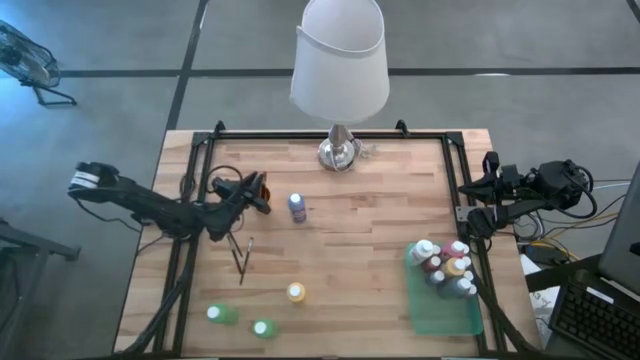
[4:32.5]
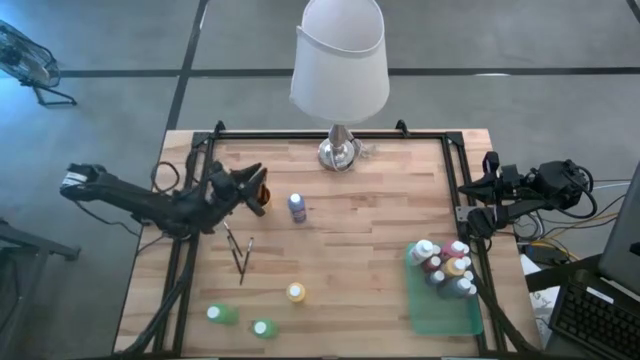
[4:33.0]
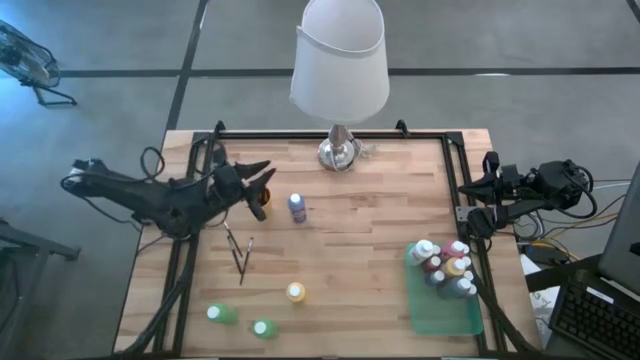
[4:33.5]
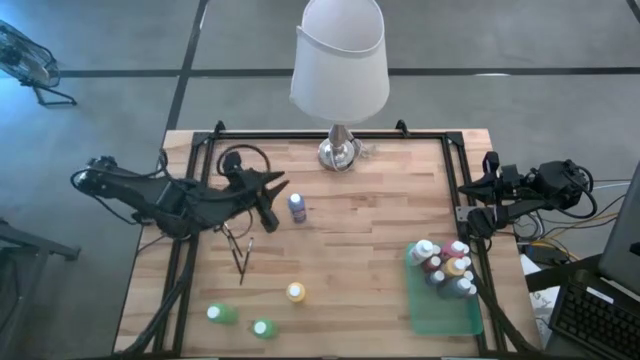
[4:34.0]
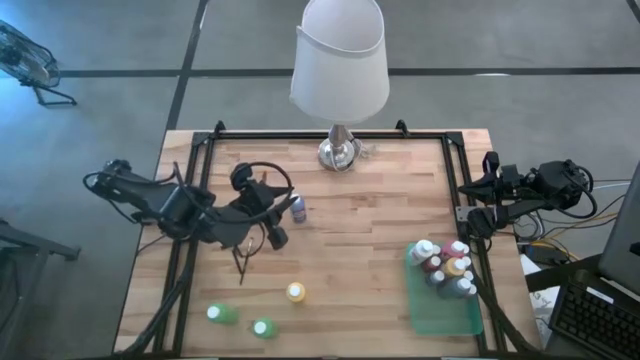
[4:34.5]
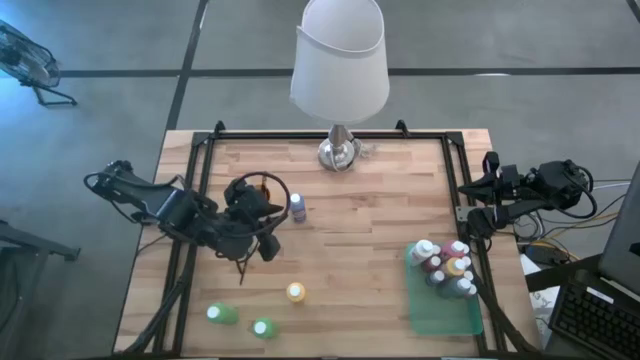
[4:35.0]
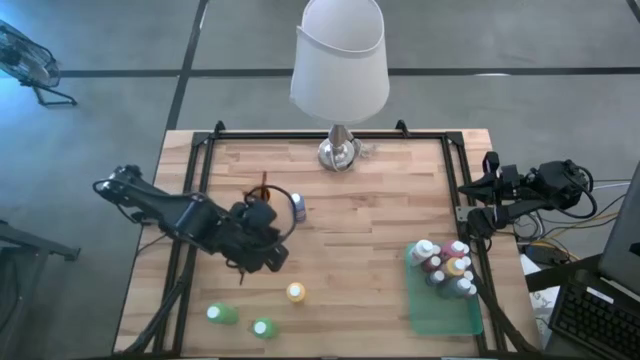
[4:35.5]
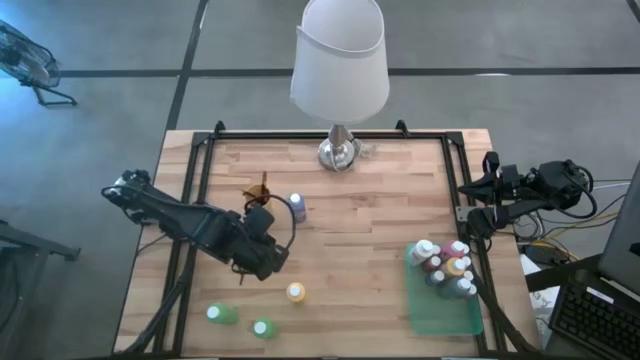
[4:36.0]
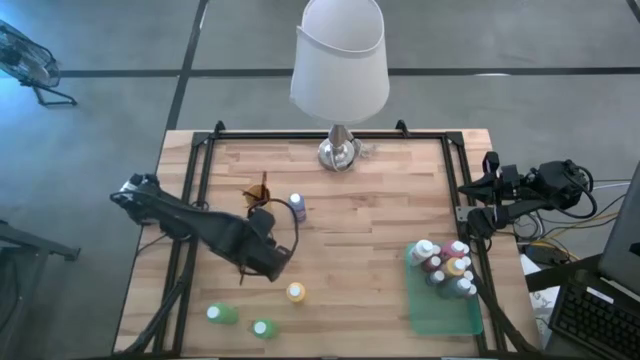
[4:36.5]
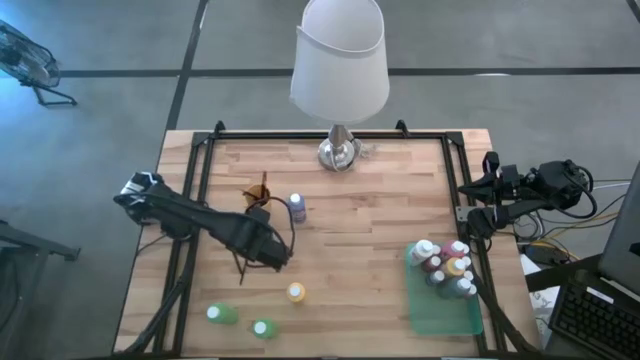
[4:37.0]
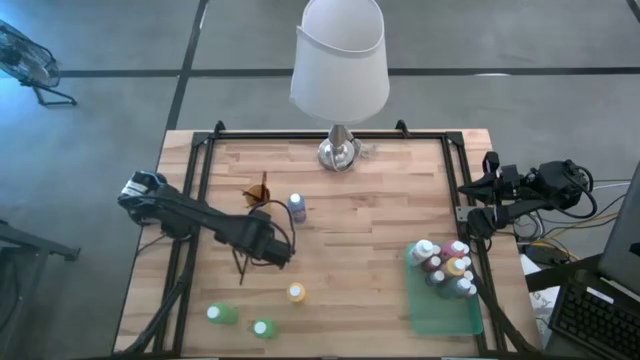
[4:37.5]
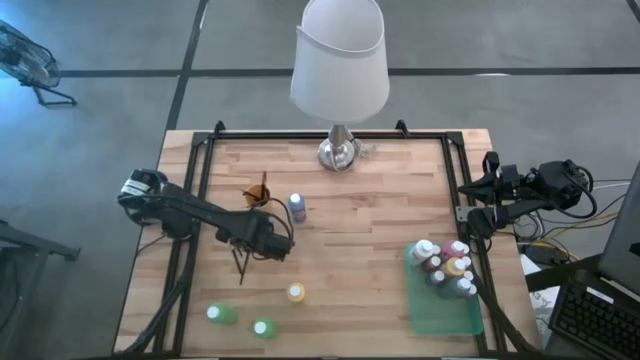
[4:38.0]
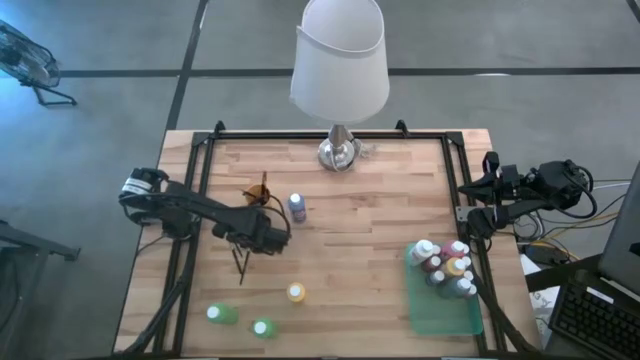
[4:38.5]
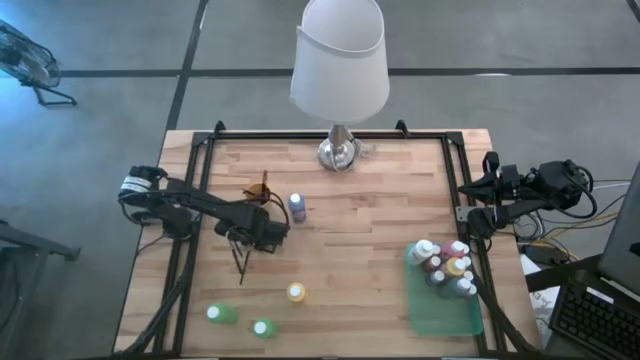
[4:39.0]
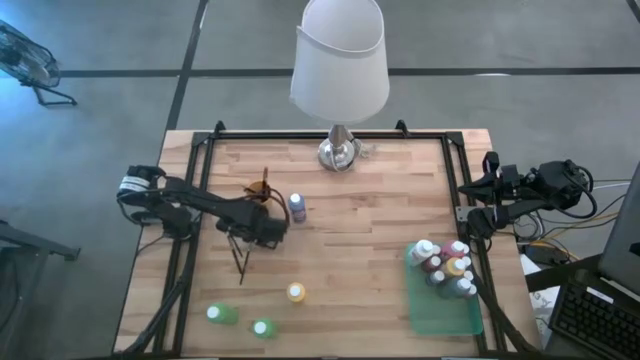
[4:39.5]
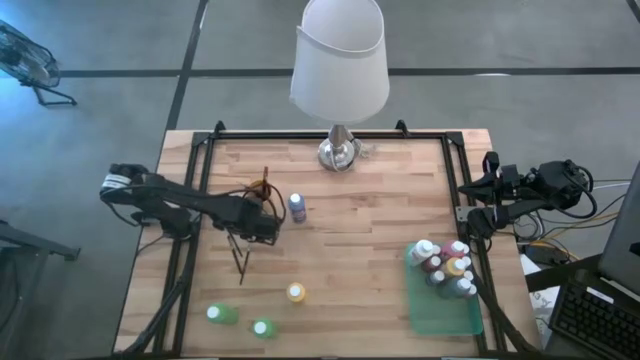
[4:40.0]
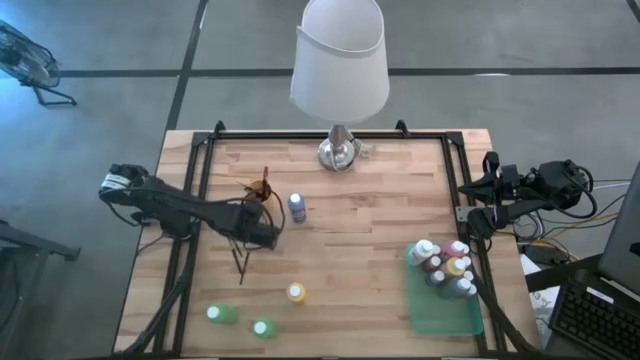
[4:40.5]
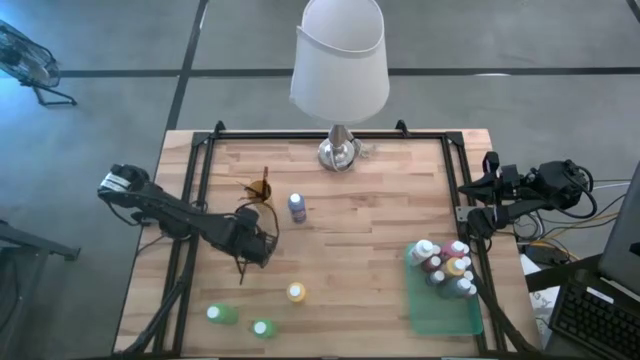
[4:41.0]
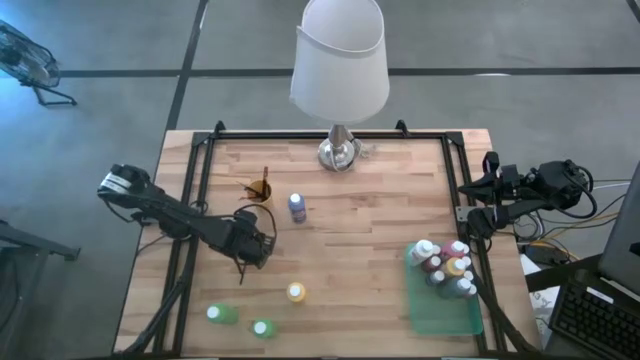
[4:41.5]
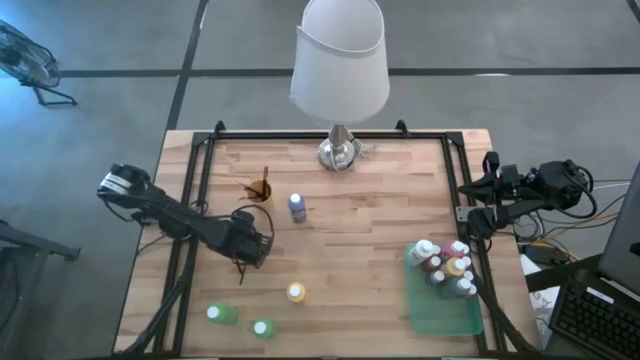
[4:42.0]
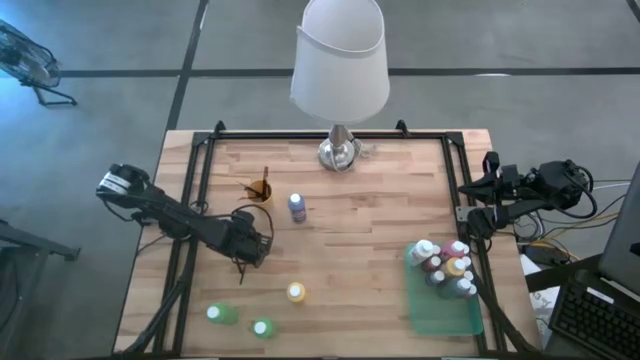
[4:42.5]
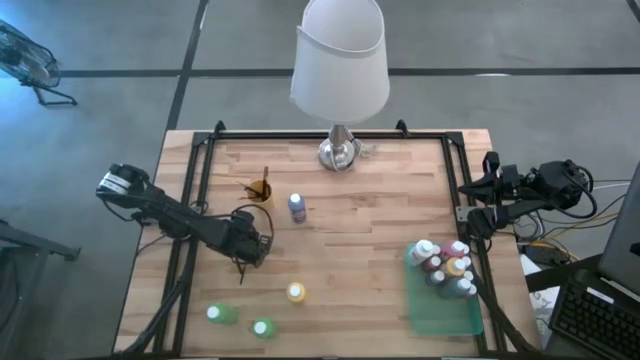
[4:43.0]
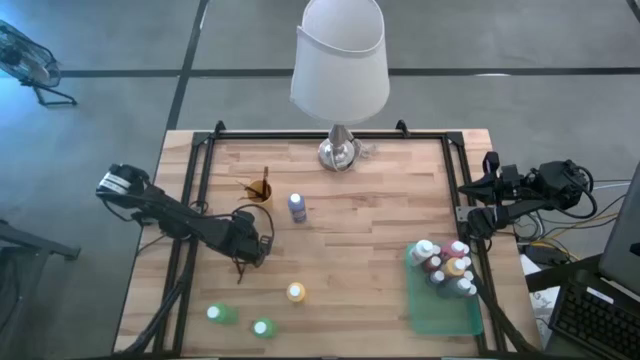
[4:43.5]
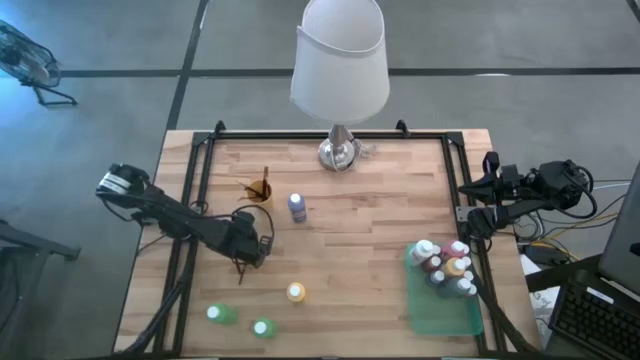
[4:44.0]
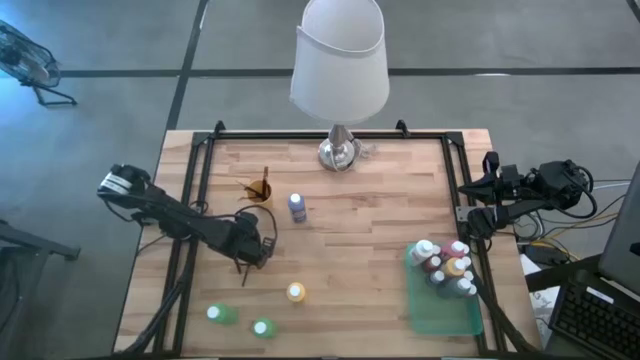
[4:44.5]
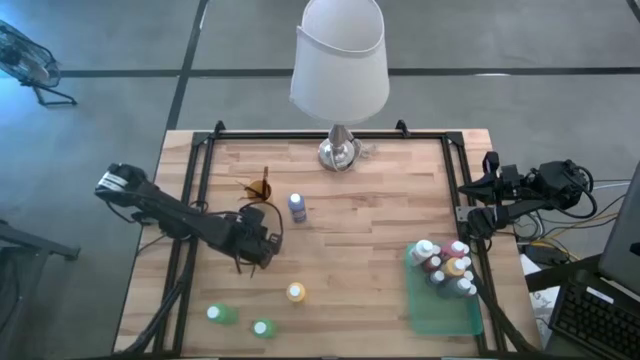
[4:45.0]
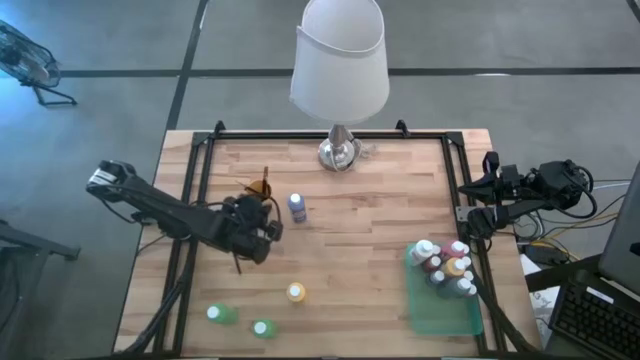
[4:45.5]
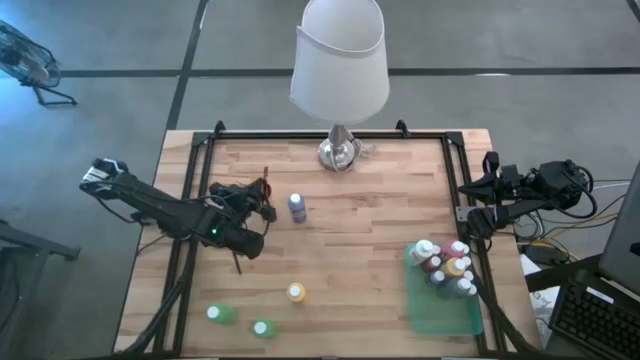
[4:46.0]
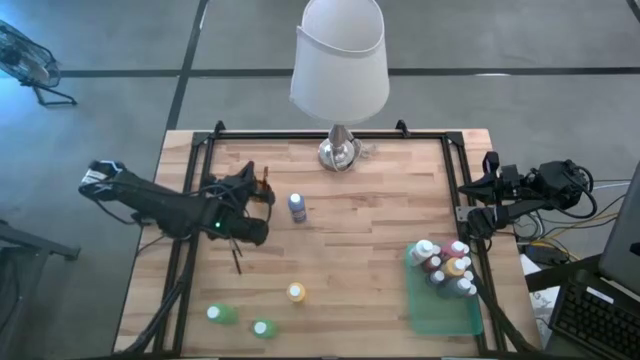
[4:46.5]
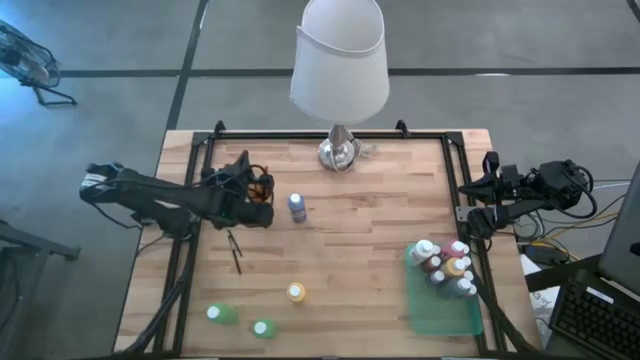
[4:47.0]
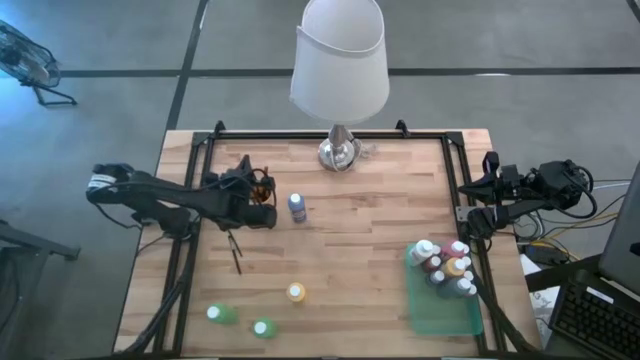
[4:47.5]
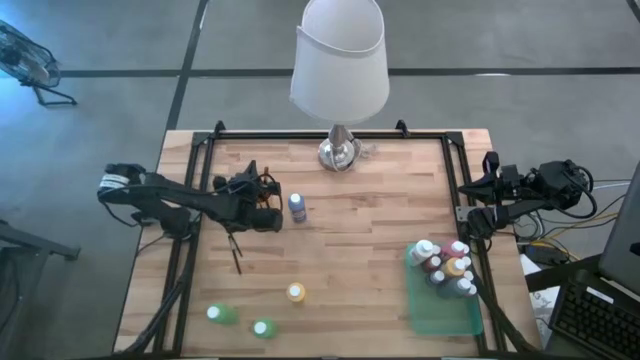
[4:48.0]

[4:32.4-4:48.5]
Task: Pick & Place Paint Supplies
Put the silver paint brush into the yellow cup
